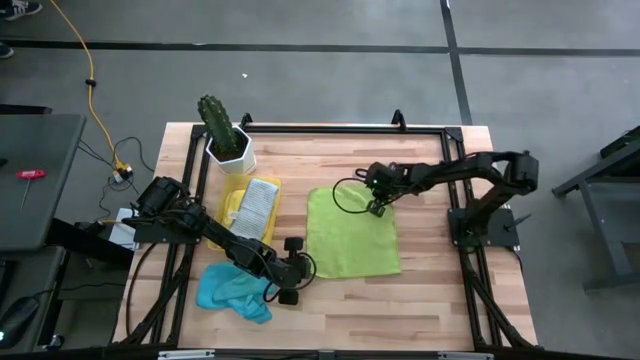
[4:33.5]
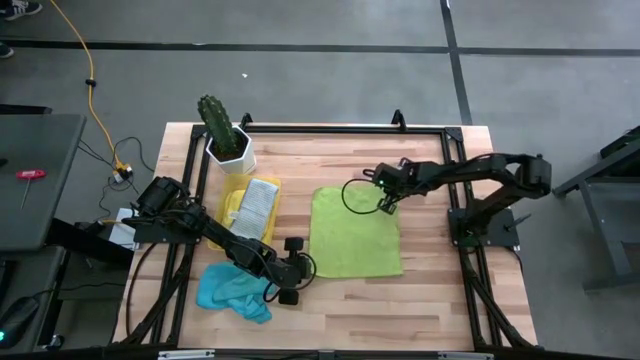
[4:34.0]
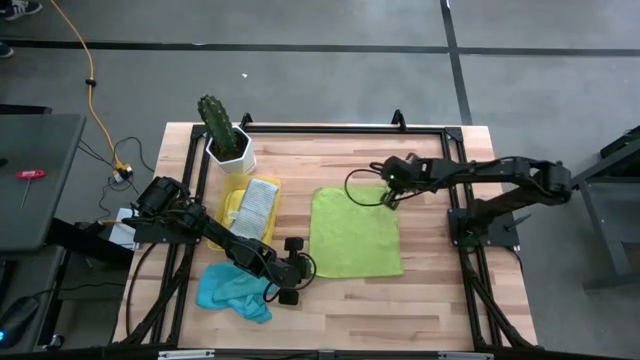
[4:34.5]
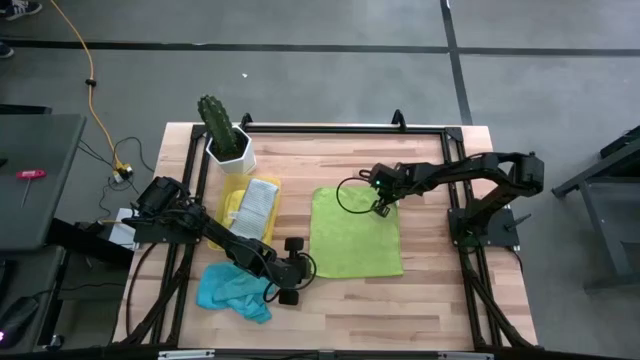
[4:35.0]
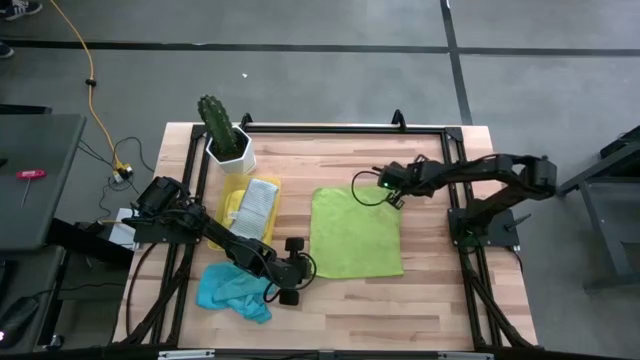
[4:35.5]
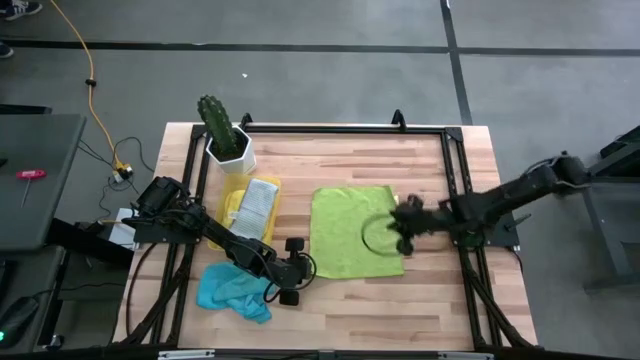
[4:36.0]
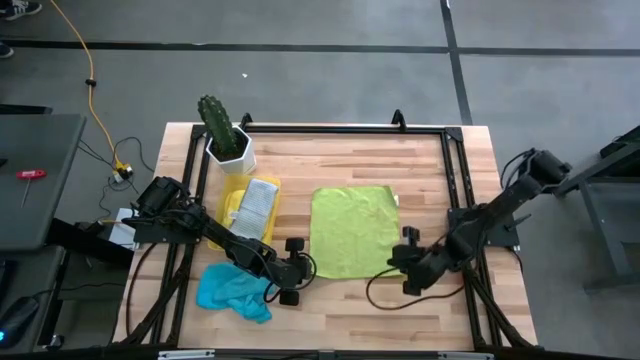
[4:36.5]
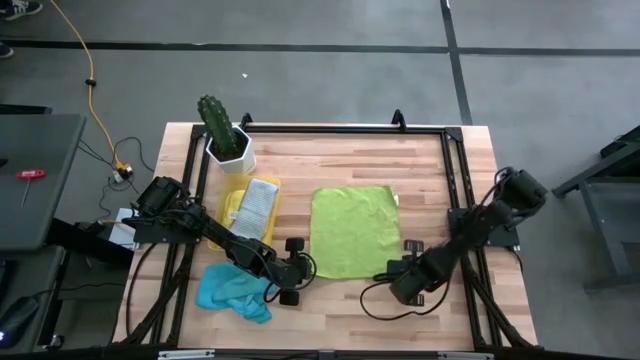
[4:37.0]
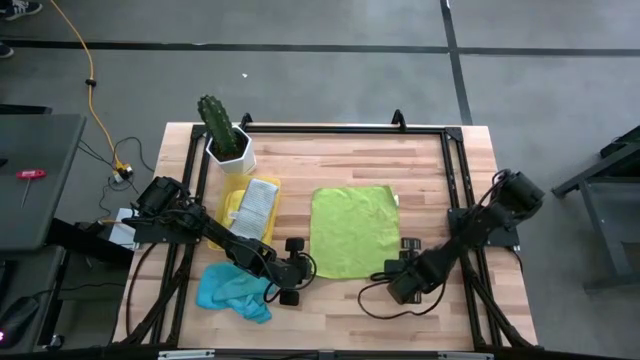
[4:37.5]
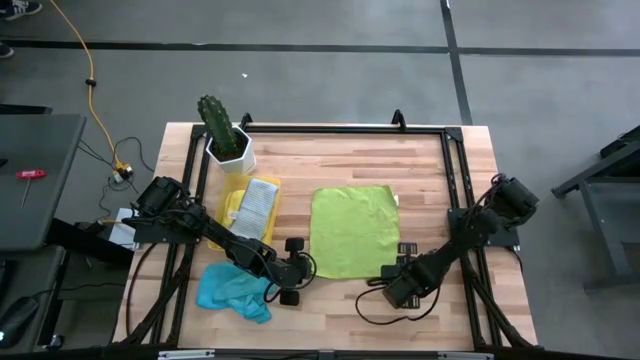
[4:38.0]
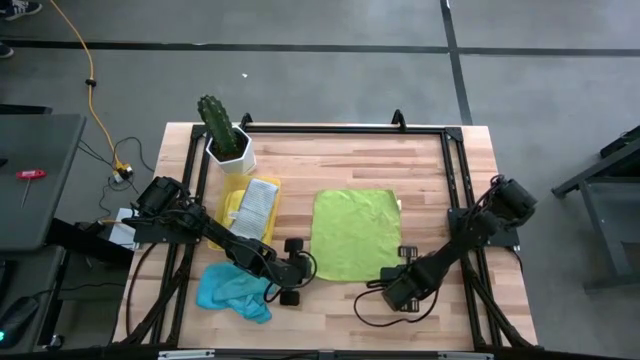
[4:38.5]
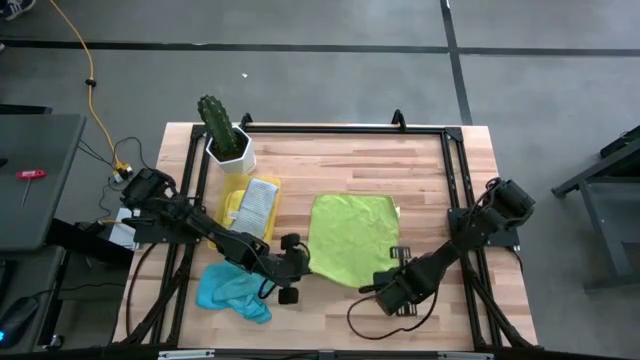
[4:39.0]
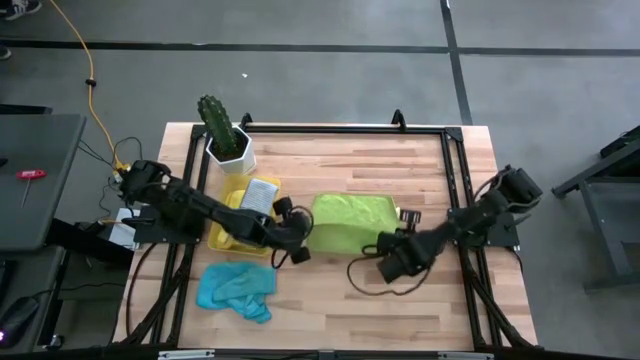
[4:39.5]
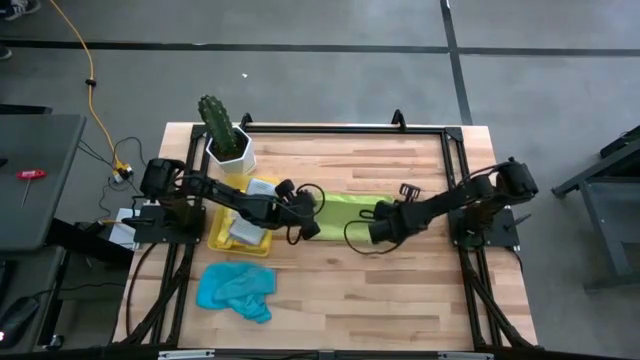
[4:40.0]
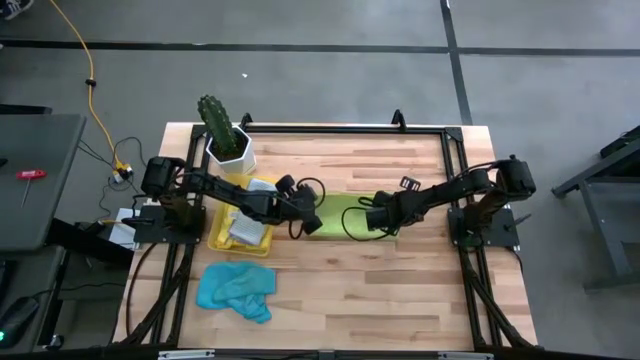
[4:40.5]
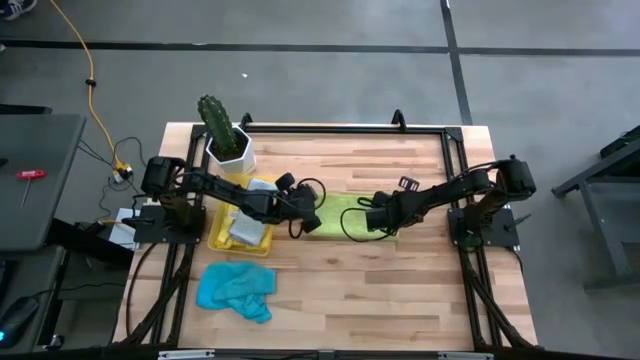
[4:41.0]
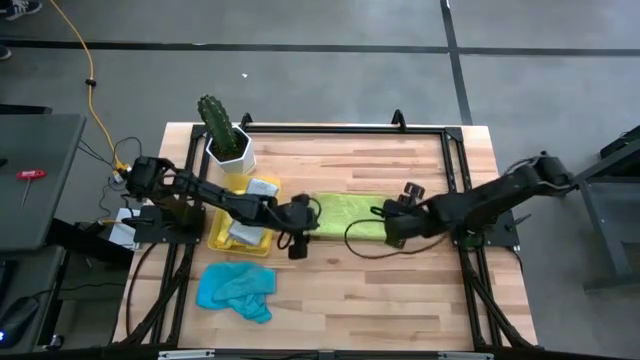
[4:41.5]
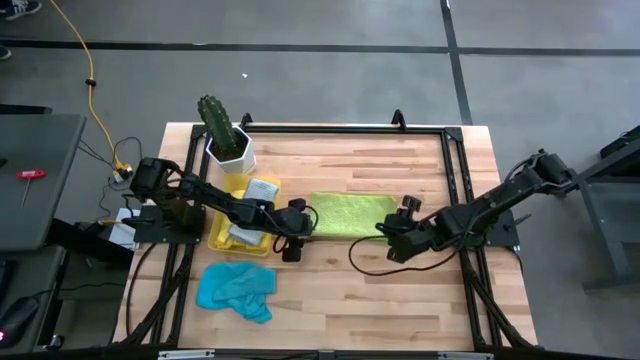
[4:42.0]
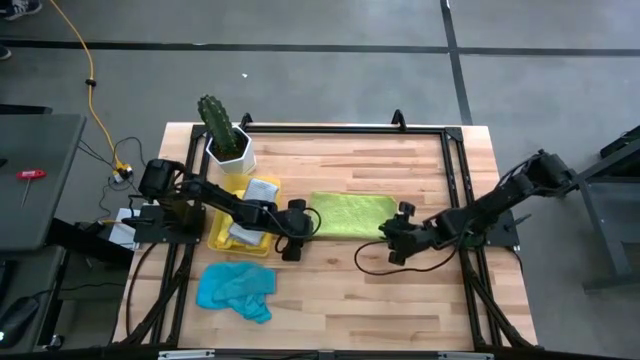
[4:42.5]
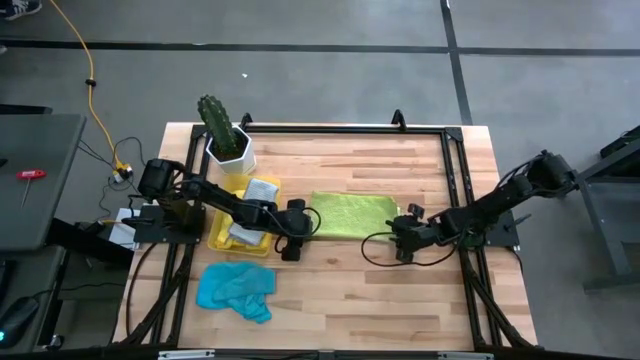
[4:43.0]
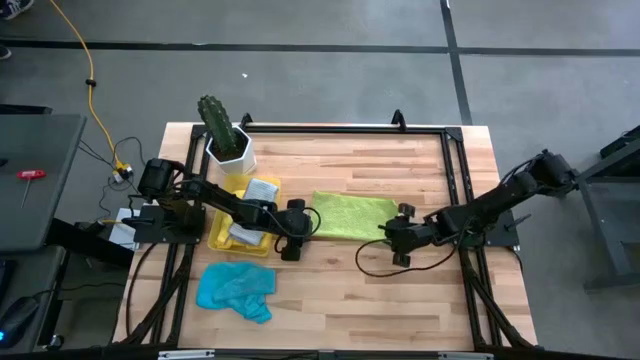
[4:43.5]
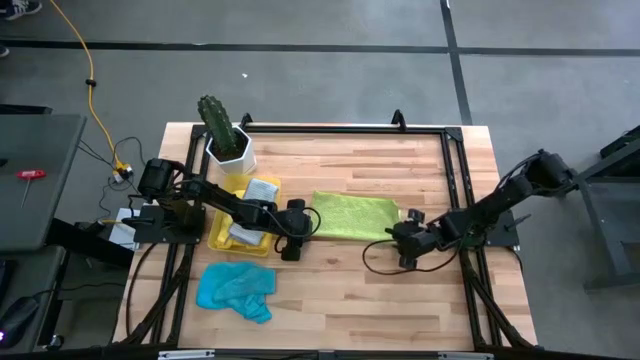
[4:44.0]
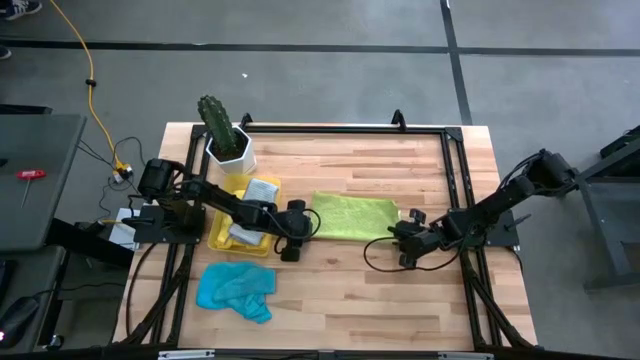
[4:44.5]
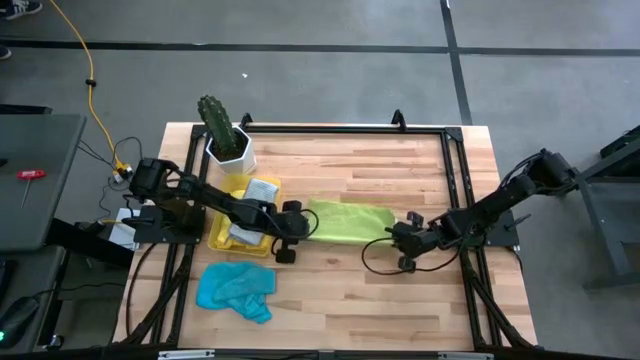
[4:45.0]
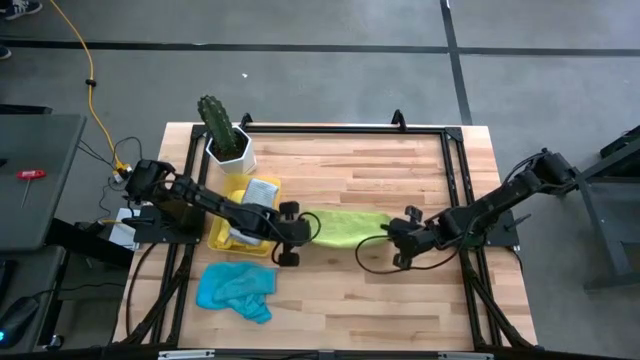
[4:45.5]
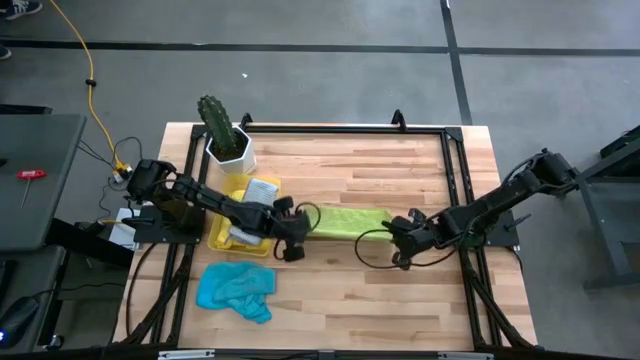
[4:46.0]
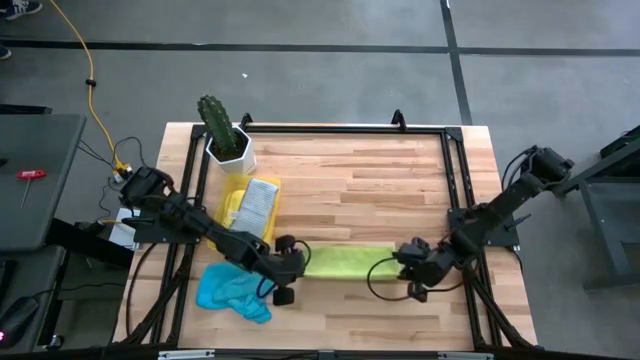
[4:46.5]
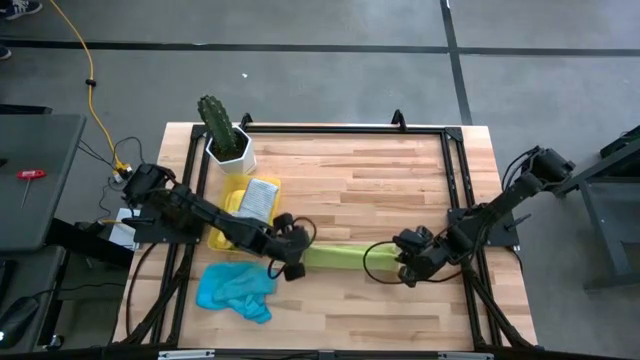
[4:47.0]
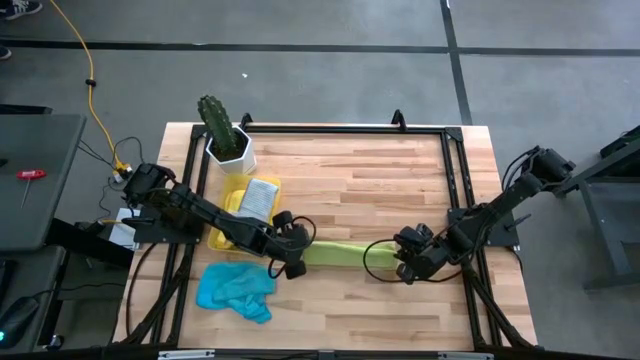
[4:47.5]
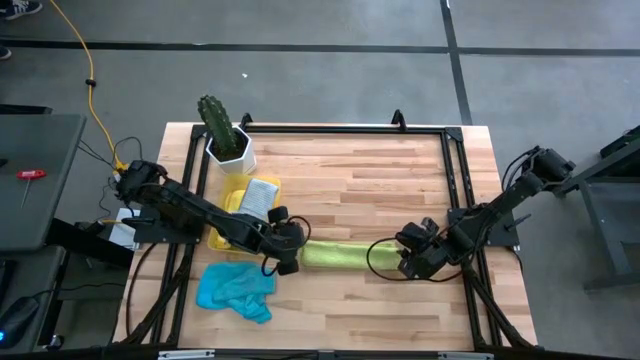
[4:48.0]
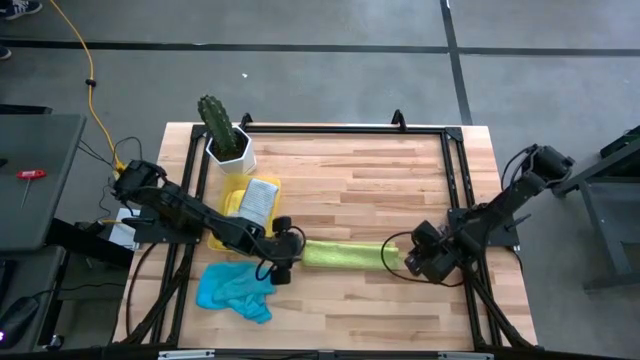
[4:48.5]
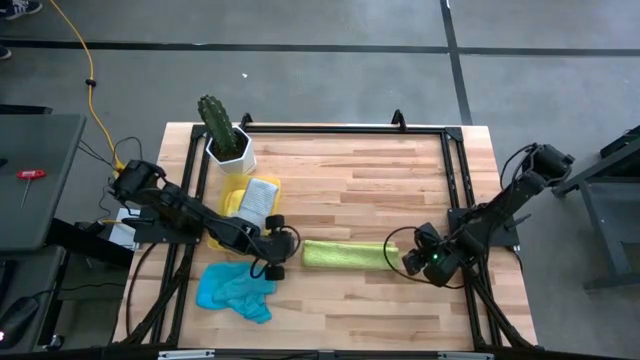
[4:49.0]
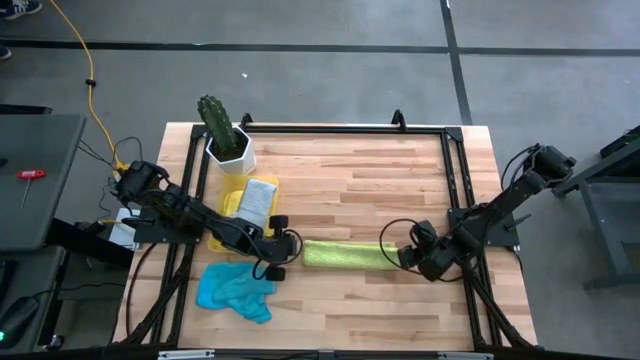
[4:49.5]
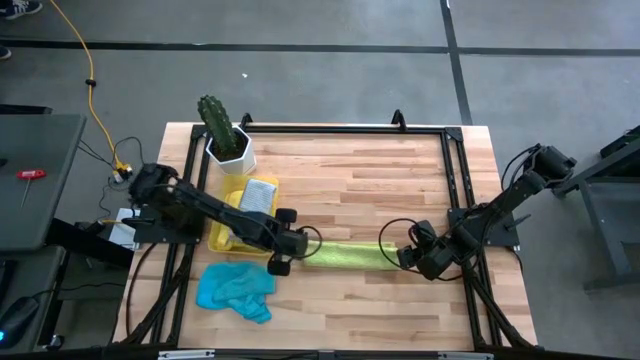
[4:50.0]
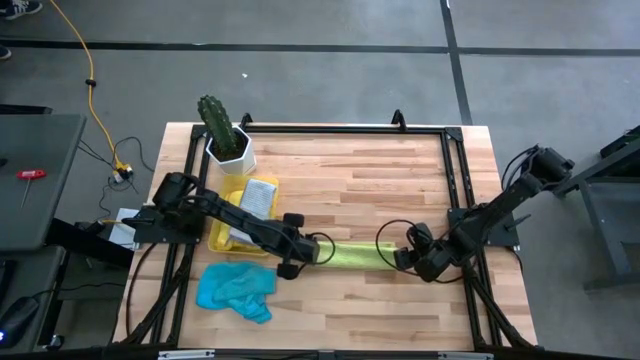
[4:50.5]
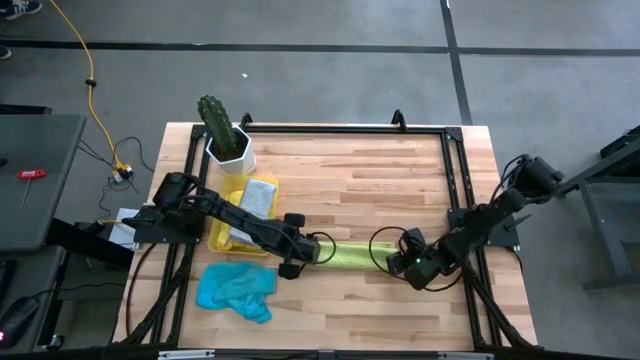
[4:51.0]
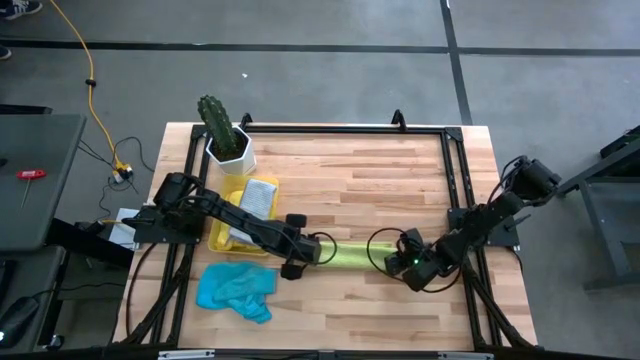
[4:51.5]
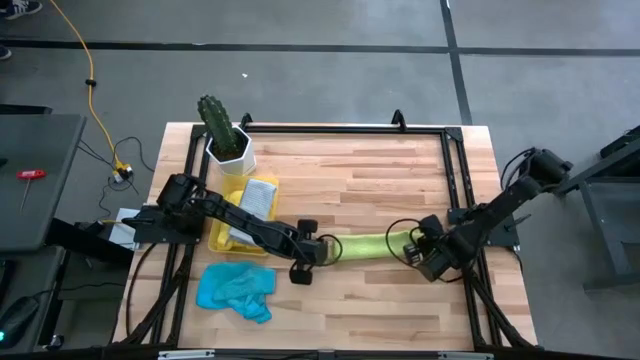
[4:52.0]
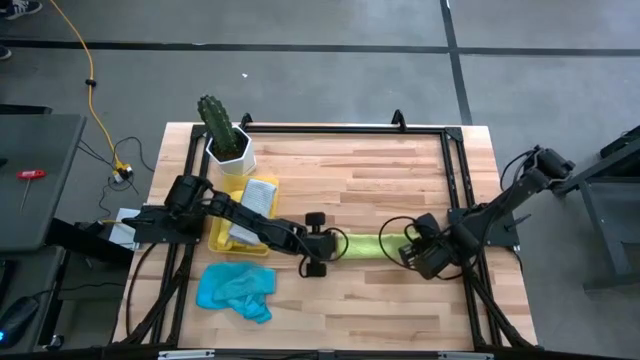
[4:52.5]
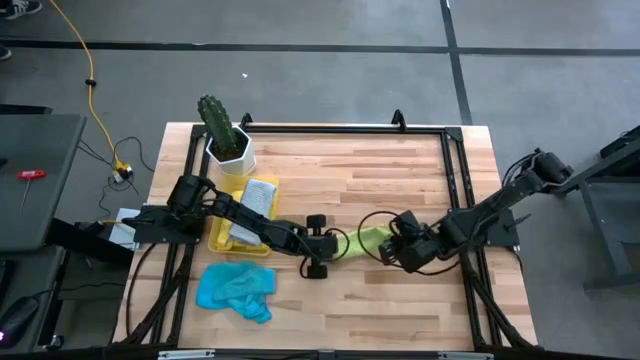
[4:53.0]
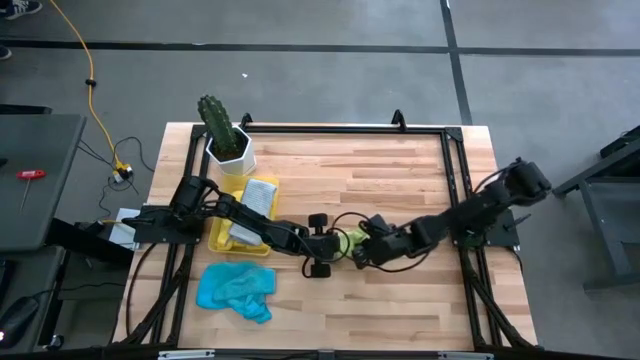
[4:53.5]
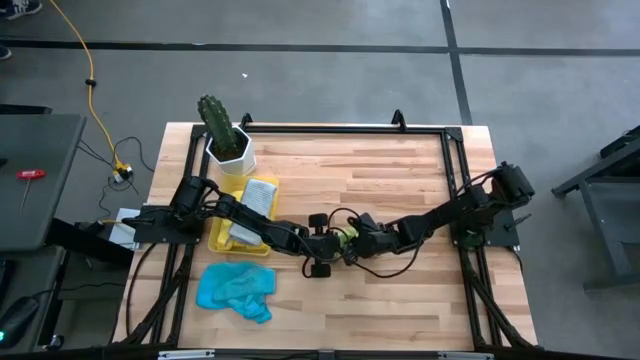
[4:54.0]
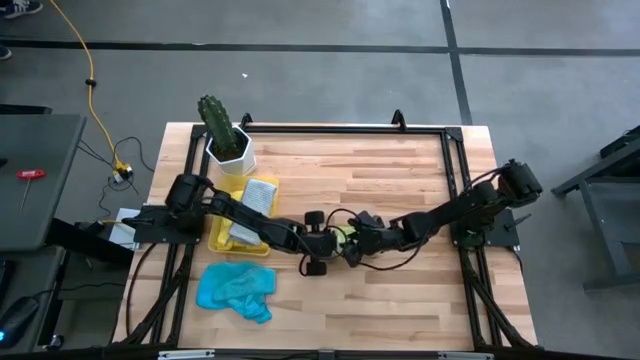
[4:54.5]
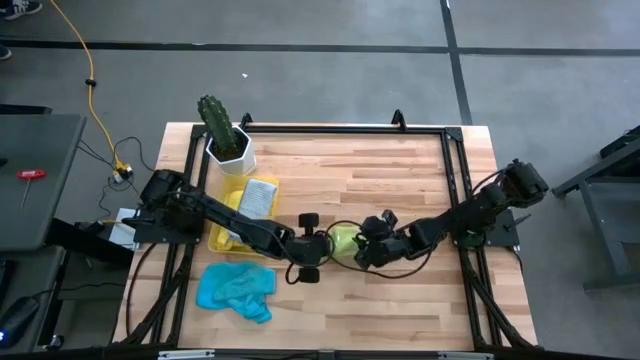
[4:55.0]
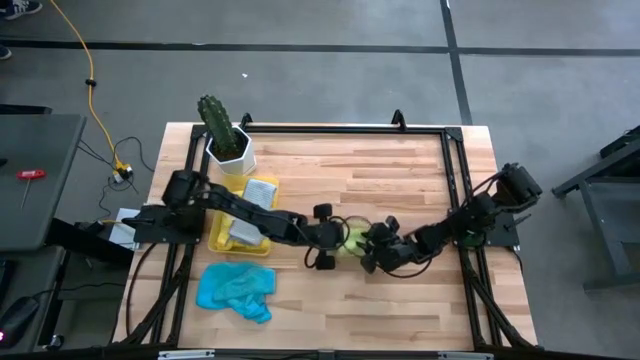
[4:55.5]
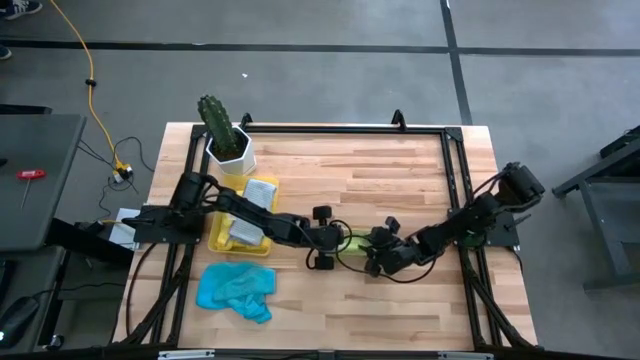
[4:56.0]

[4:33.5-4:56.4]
Task: Fold microfiber towels
Fold the green microfiber towel
